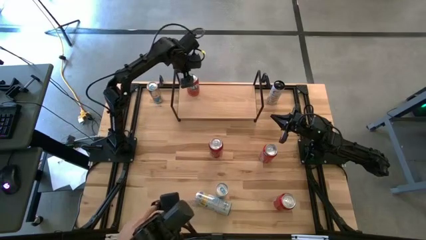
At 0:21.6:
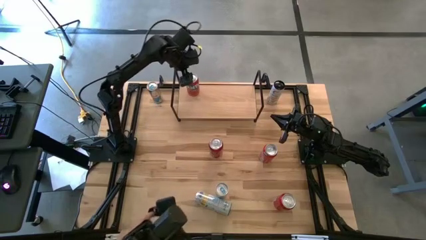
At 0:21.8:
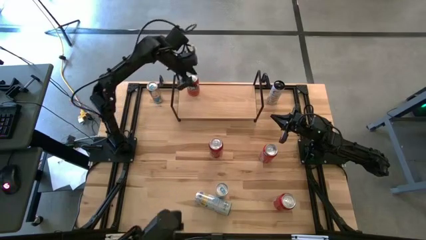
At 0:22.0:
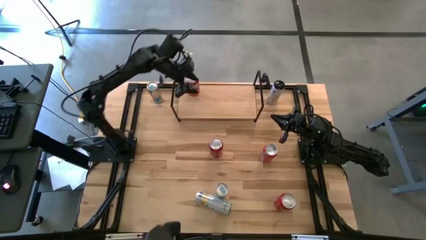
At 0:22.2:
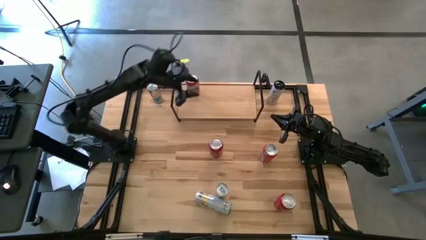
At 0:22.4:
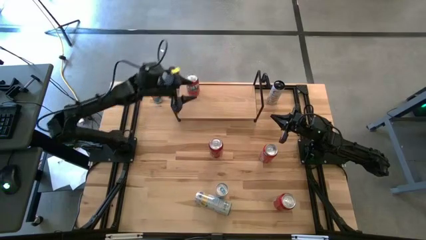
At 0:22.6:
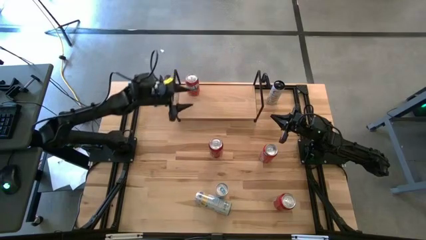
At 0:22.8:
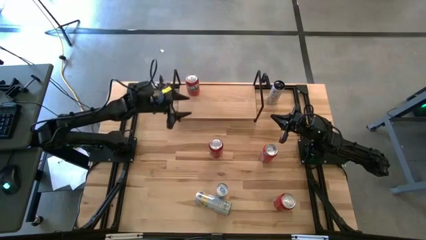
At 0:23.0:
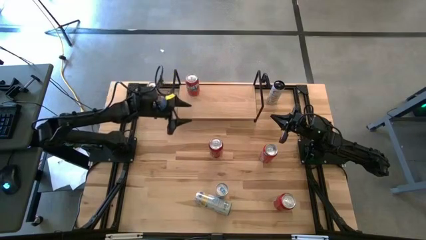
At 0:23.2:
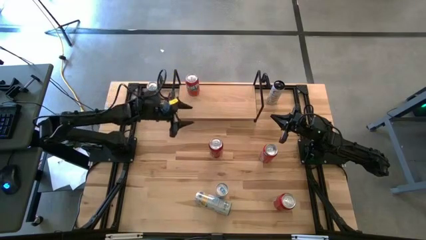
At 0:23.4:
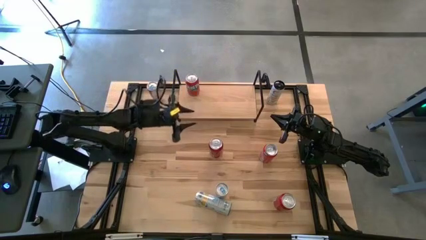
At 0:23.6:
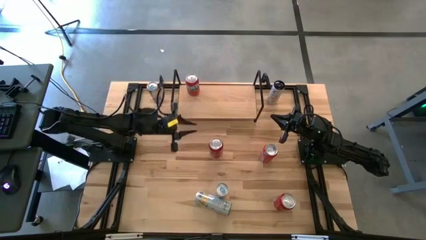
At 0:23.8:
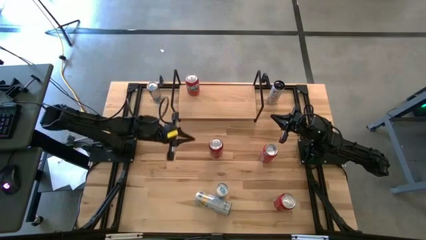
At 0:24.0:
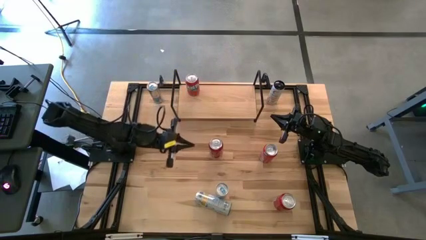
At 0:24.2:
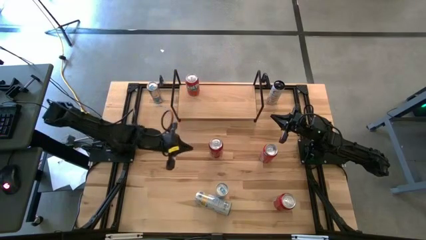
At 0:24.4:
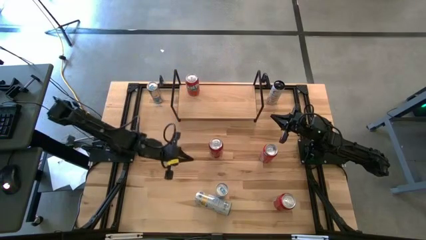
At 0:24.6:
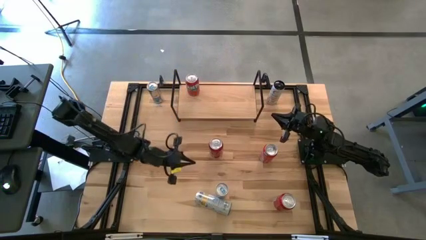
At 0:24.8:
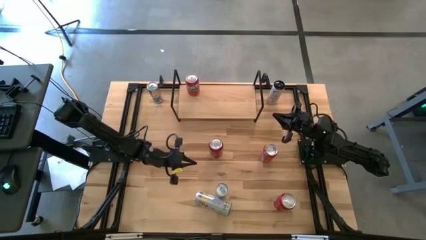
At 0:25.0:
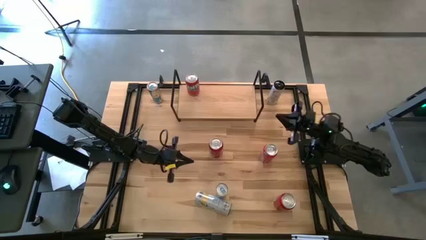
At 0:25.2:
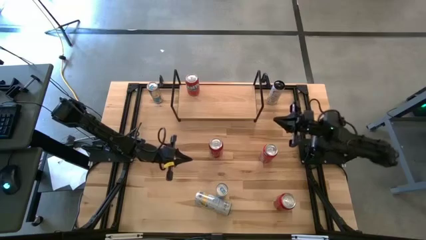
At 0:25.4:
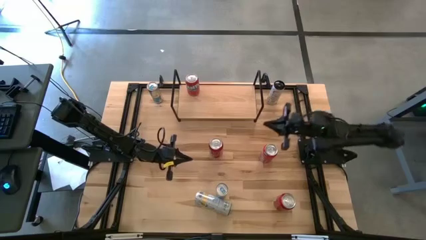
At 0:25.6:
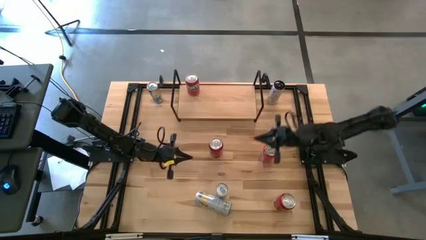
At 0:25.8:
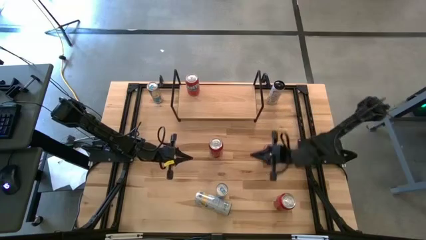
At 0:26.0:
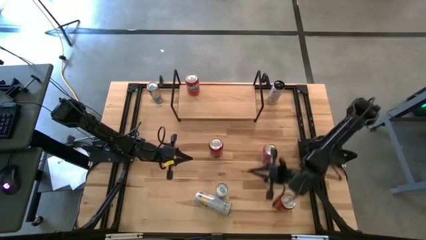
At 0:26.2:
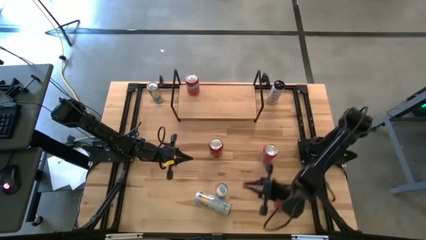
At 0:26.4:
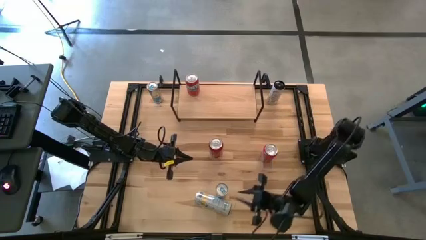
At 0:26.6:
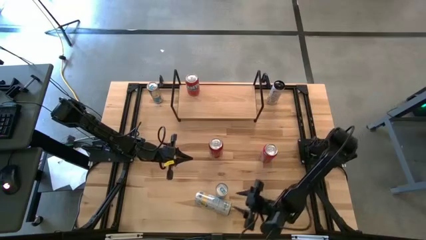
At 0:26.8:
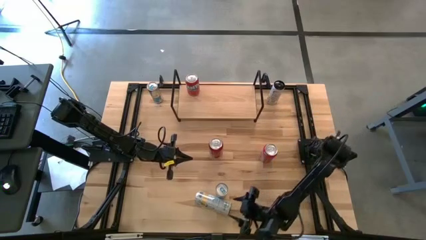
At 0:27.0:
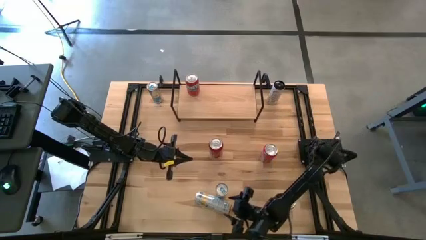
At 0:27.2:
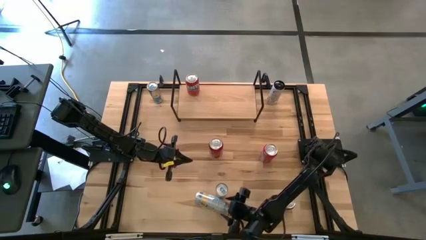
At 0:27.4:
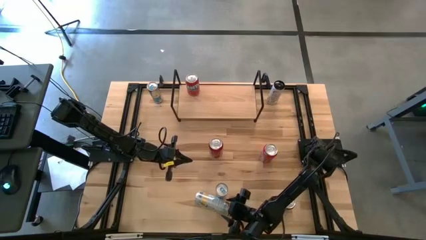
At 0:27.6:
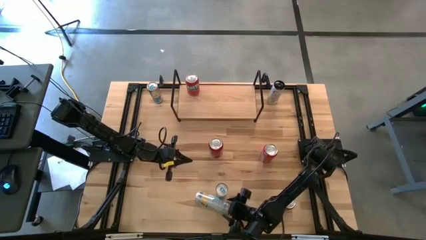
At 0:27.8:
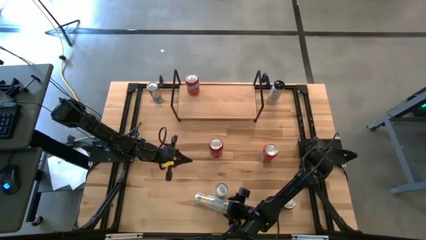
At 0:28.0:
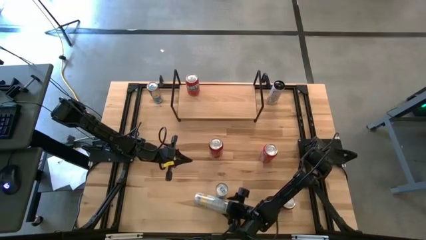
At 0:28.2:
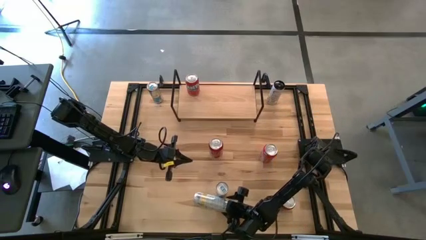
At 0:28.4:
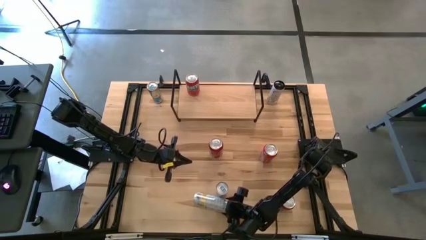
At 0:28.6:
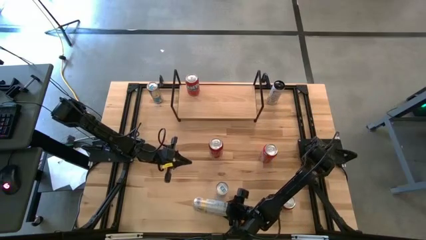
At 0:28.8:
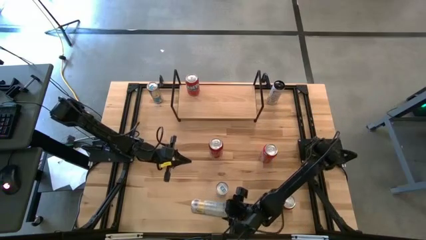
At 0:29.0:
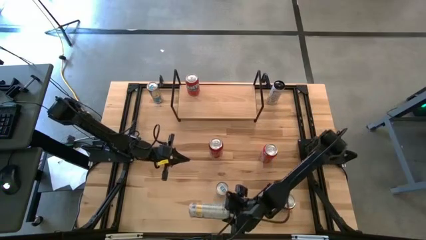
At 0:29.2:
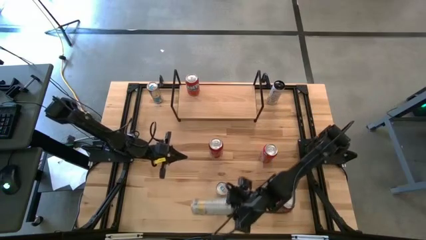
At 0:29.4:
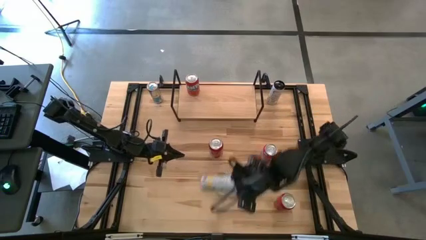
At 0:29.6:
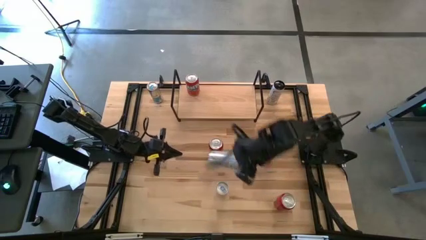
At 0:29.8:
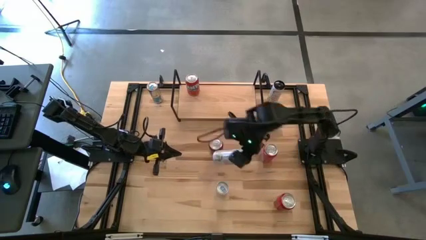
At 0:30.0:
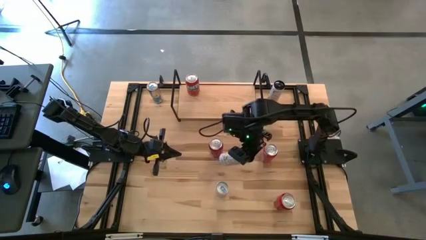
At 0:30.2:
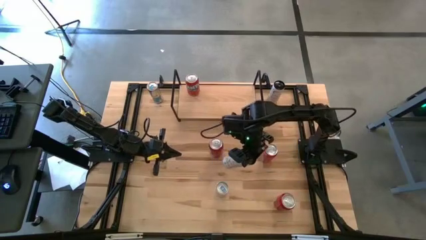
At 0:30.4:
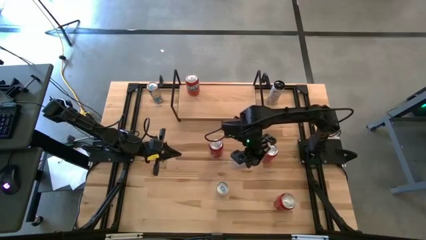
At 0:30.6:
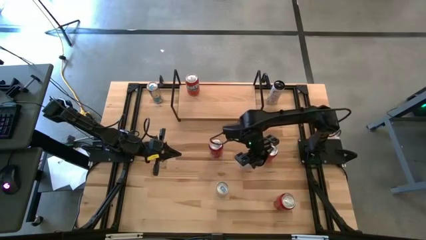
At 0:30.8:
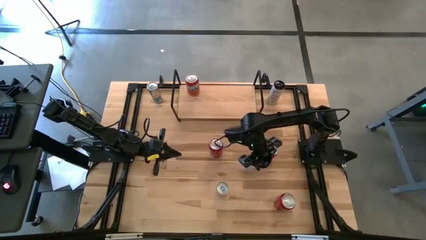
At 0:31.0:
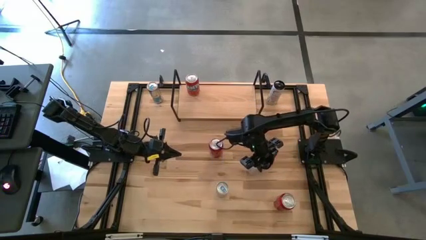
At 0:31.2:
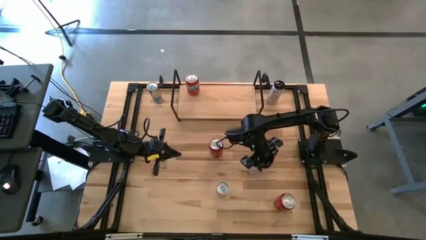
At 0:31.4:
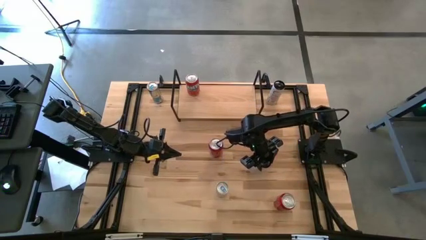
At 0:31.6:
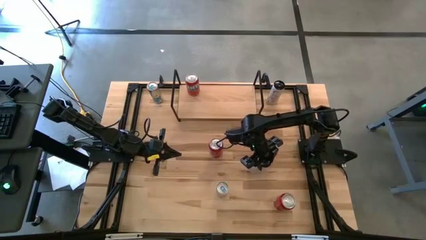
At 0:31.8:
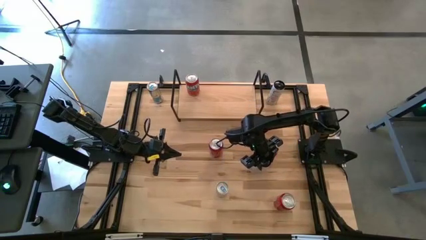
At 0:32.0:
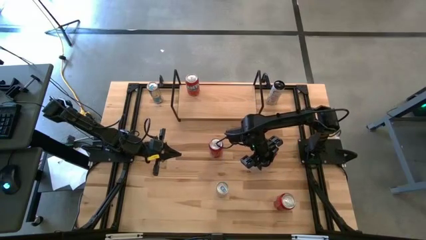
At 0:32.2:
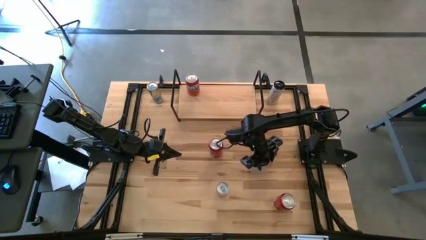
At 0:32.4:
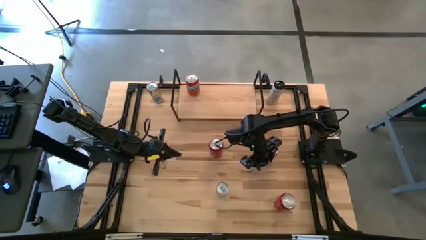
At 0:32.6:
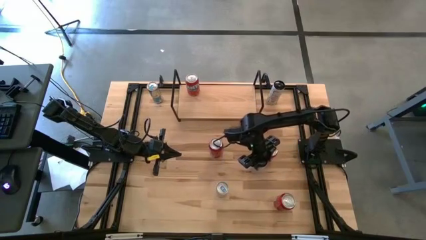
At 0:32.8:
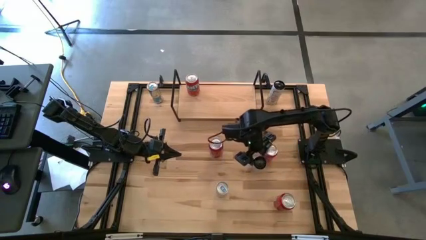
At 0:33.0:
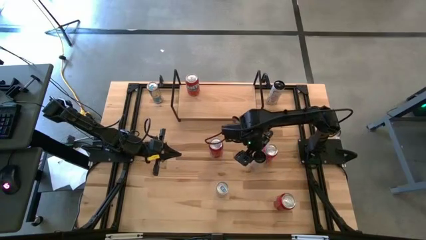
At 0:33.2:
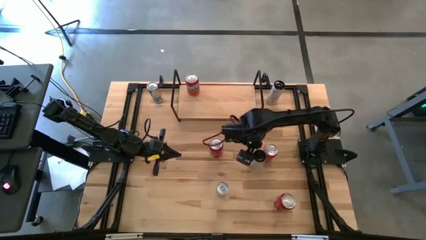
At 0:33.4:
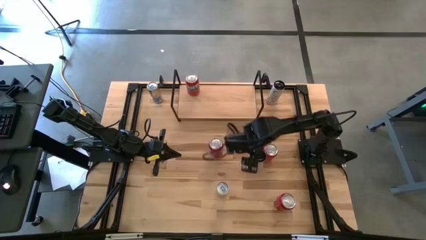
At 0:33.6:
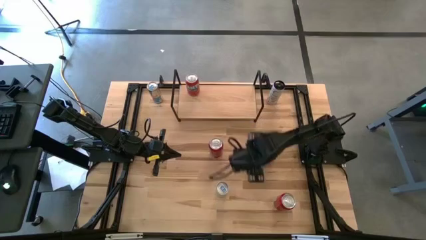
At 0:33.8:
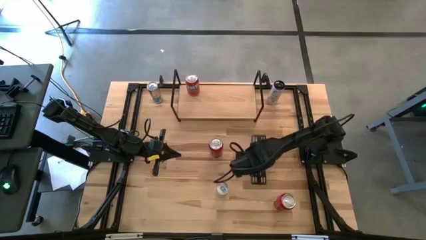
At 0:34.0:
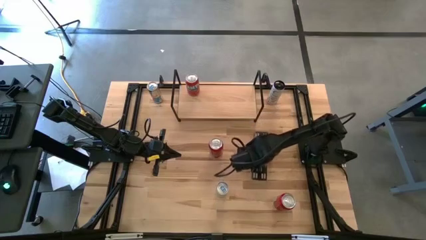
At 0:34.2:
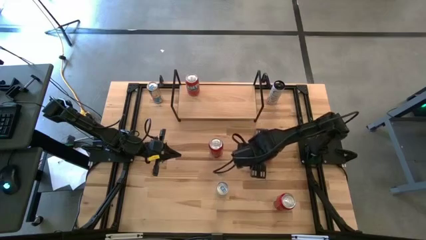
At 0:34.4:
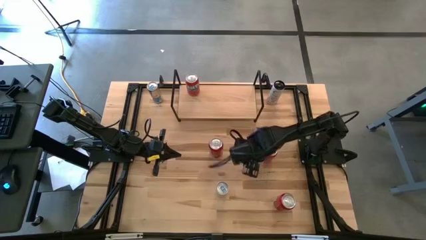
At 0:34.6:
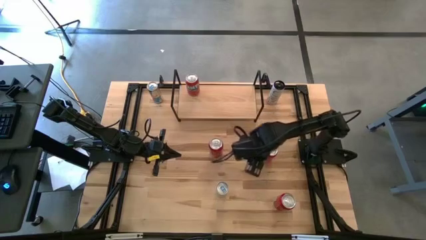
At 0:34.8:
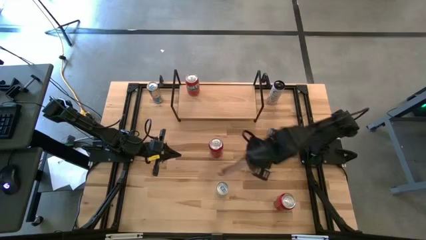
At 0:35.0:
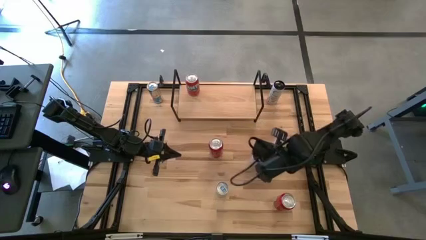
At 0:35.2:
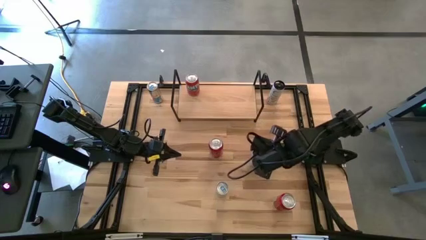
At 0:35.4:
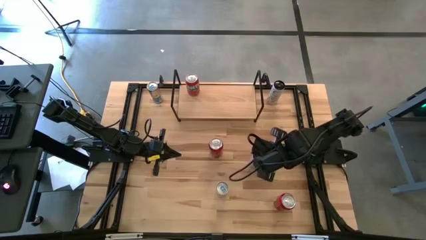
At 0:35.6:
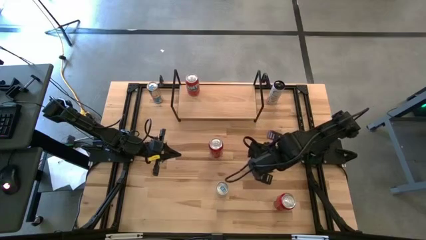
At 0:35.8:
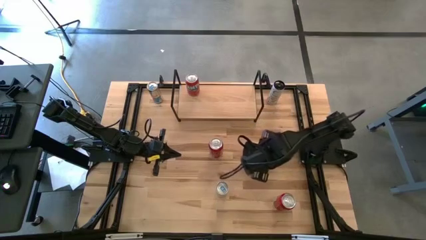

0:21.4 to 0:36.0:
Task: Place canned beverage on shelf
Put the bottom white yellow soda can on the shelf
